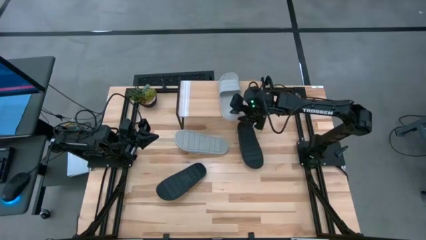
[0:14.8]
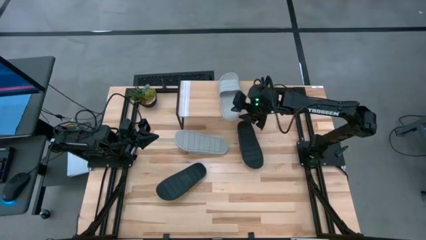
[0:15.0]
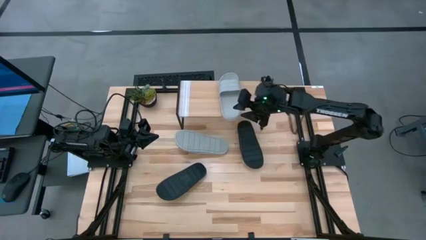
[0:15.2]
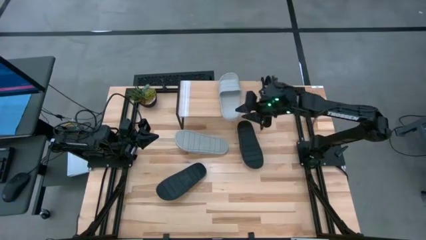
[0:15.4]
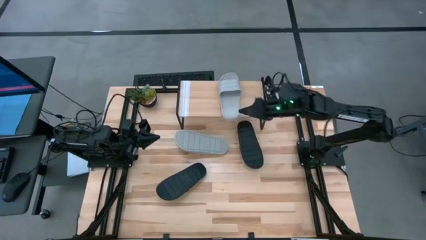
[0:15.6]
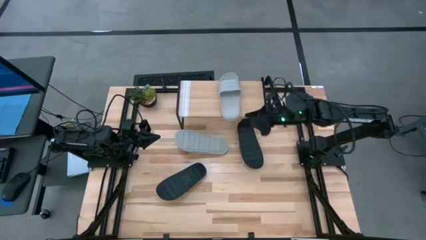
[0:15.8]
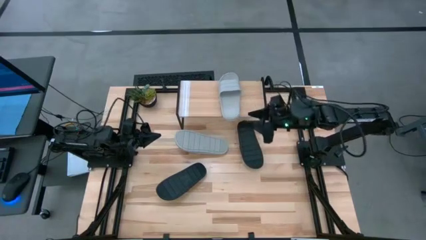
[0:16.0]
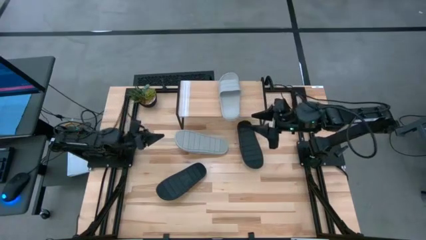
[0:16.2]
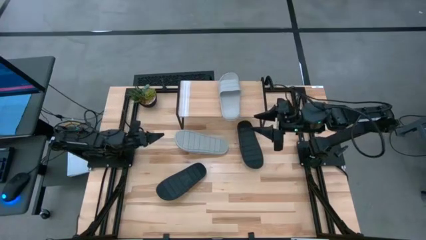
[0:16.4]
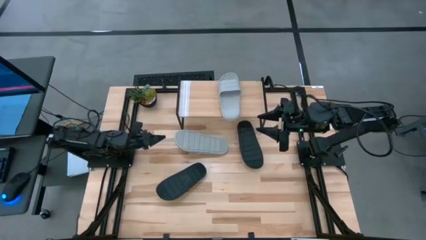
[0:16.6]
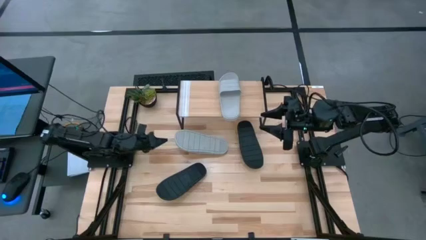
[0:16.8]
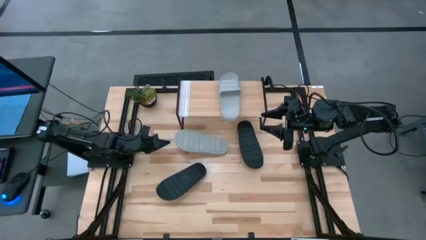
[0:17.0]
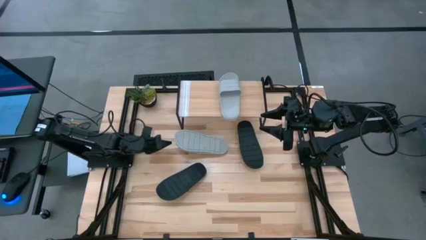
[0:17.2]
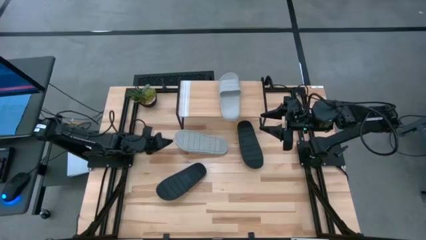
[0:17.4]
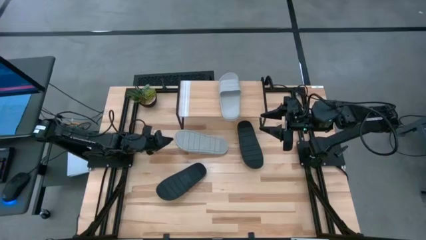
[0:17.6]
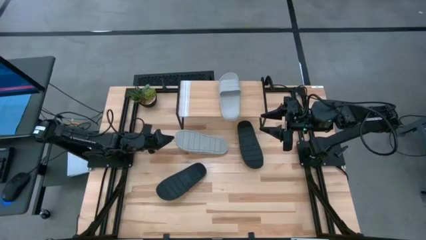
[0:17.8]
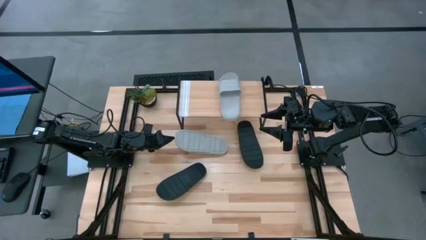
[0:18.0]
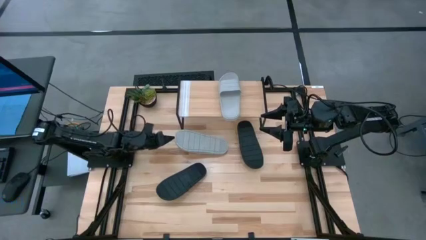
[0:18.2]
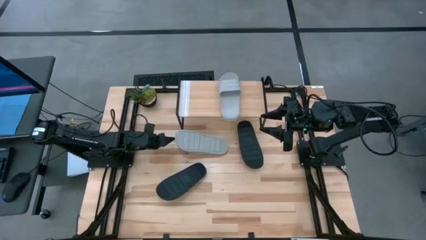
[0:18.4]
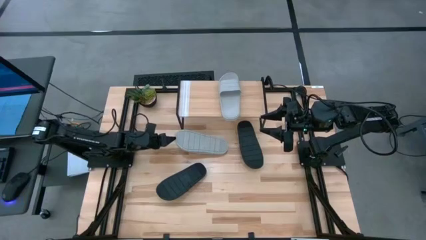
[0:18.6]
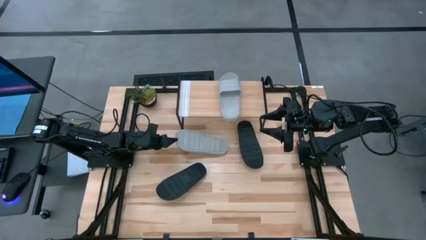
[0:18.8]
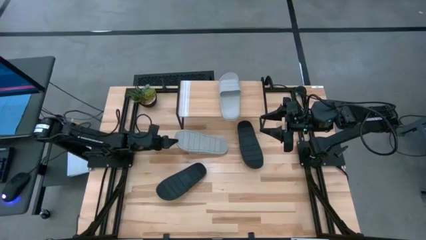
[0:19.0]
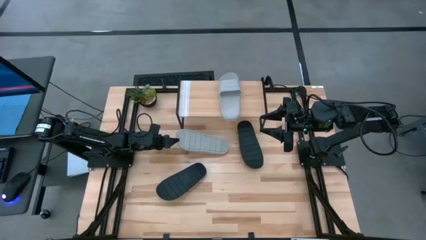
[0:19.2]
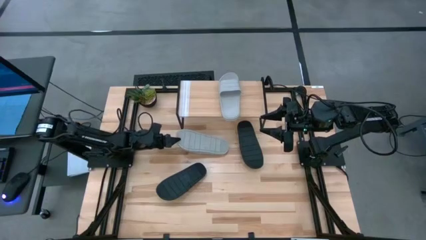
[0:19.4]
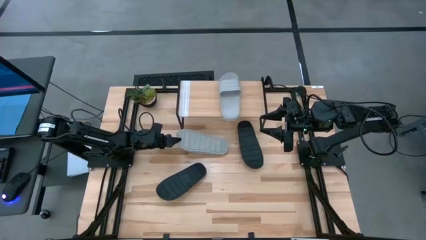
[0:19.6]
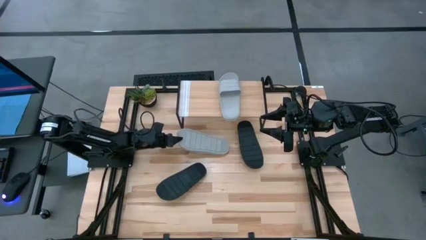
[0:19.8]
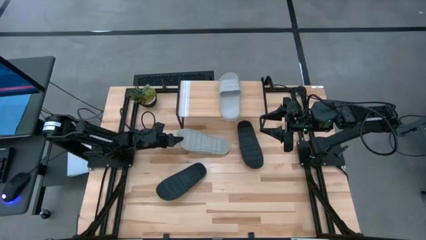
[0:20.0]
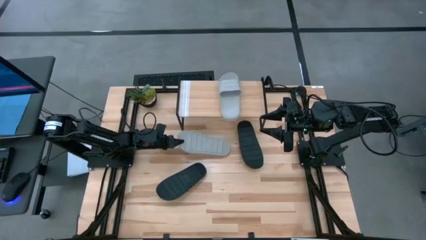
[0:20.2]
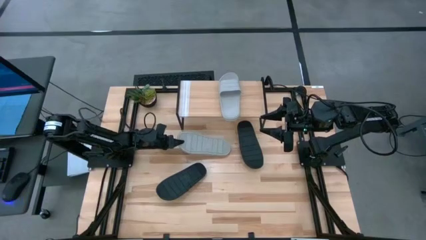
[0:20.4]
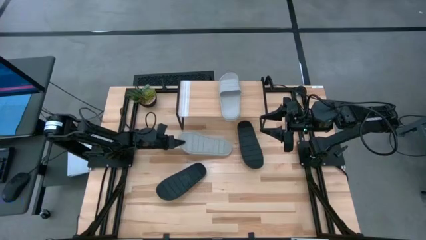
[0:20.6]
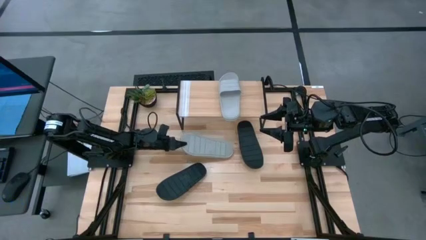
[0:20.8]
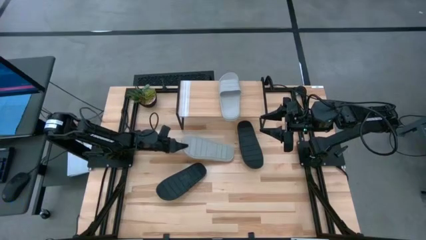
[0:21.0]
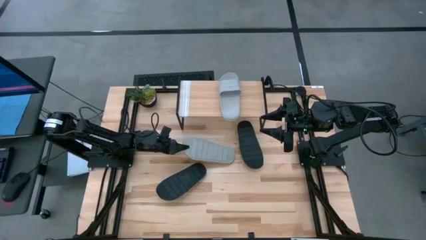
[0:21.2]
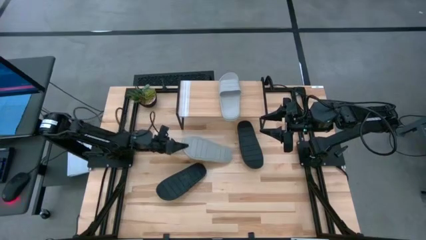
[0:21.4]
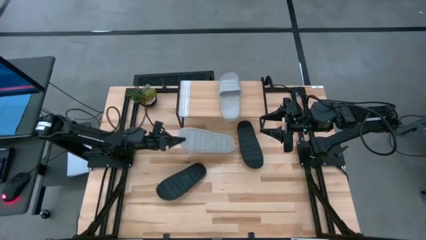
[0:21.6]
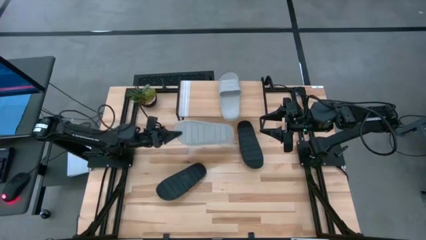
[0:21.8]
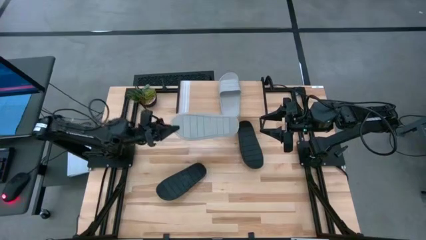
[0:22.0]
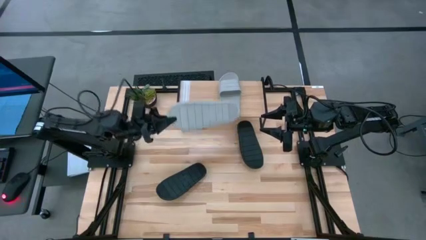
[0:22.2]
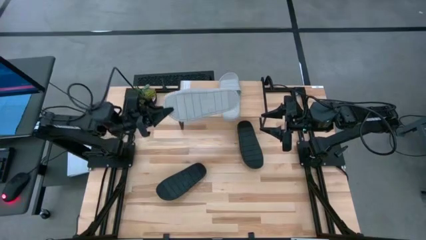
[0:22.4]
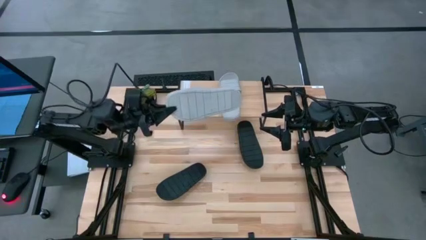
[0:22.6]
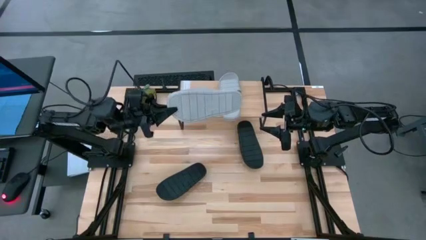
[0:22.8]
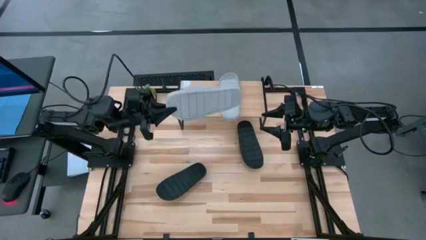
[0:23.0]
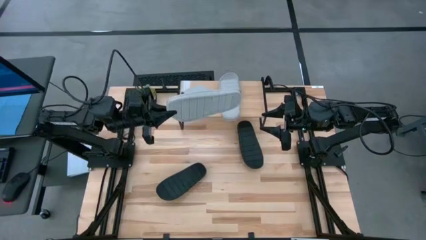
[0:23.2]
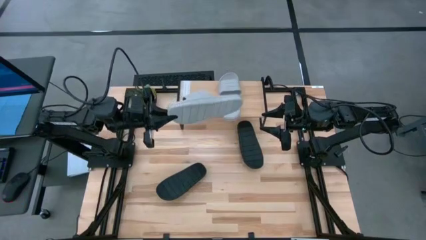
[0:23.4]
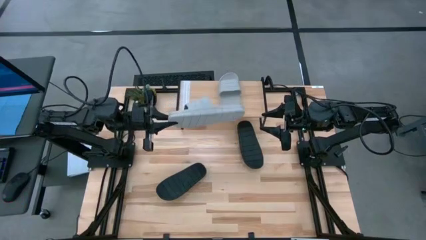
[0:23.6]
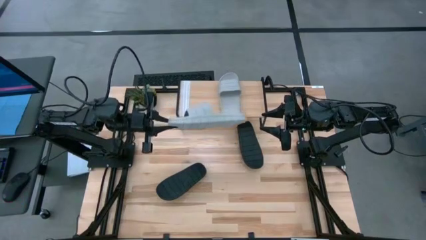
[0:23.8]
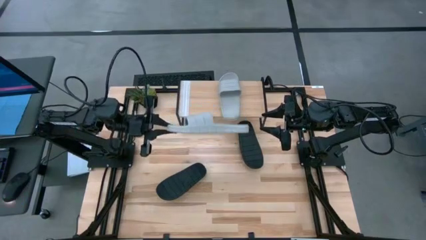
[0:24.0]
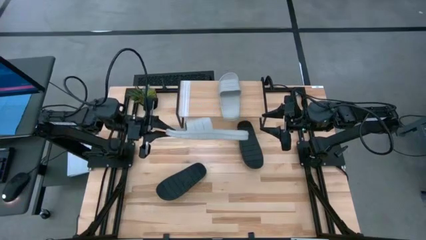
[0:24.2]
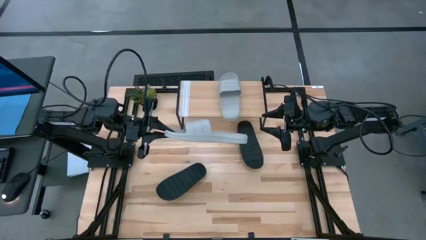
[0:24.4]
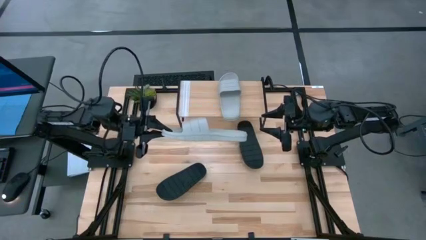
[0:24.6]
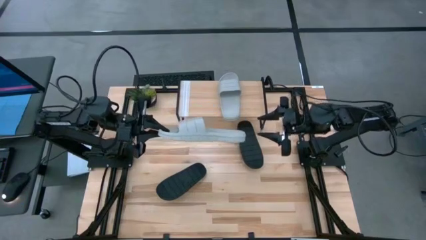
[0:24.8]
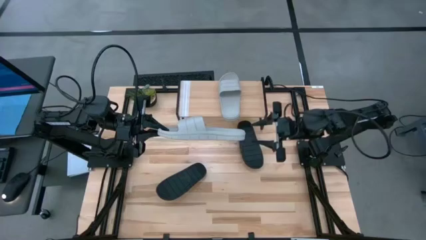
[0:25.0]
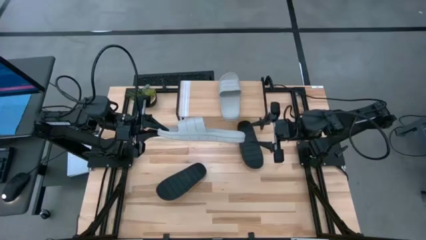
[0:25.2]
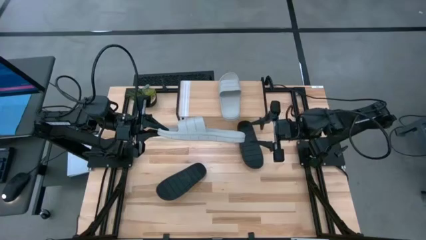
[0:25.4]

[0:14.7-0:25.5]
Task: Pick and place slides into the shelf
Put the gray slide on the shelf

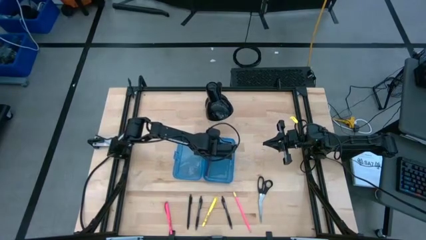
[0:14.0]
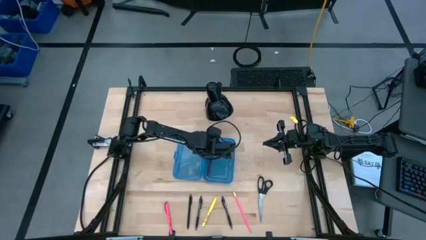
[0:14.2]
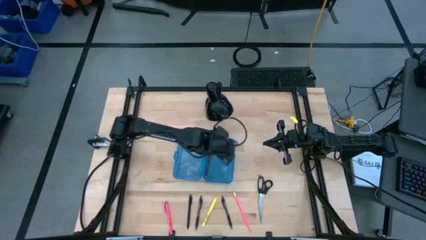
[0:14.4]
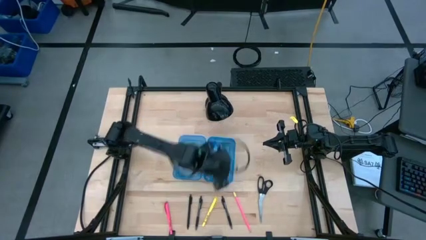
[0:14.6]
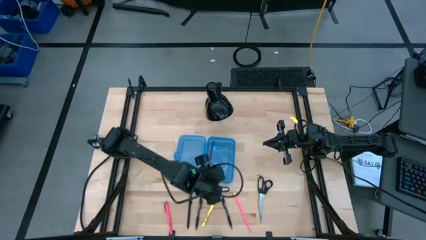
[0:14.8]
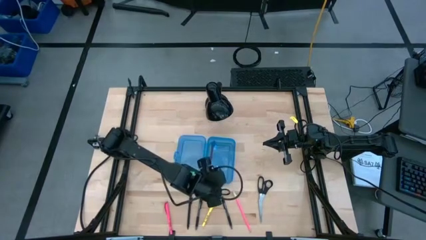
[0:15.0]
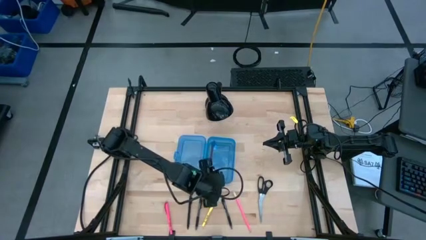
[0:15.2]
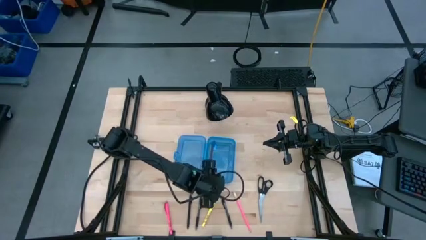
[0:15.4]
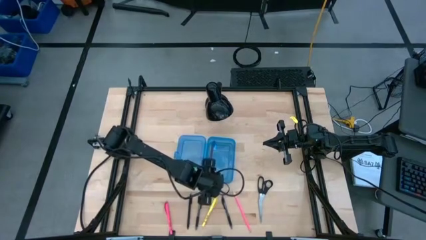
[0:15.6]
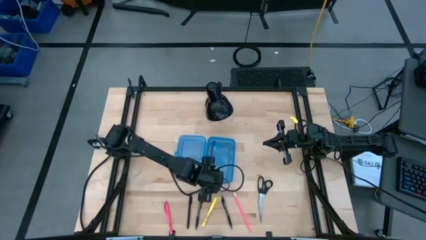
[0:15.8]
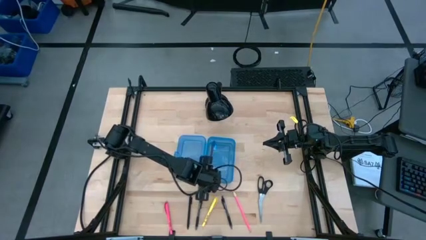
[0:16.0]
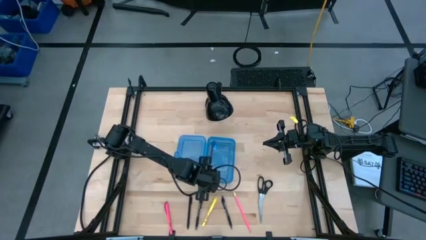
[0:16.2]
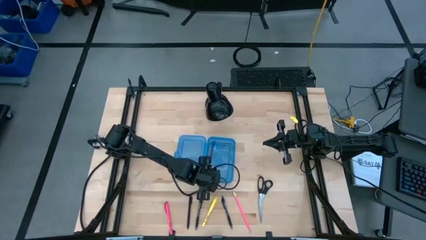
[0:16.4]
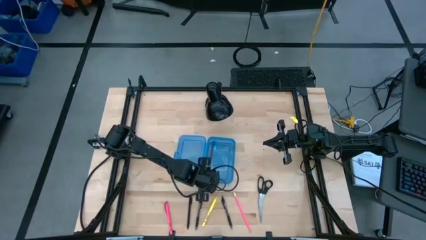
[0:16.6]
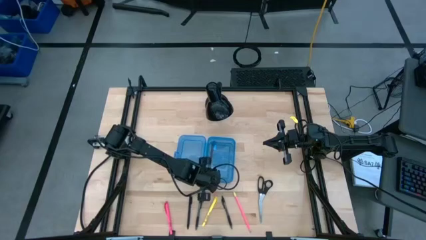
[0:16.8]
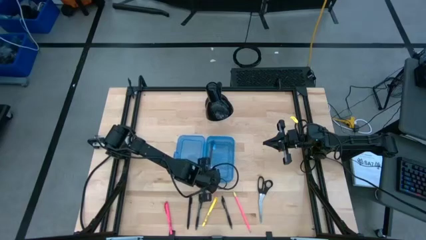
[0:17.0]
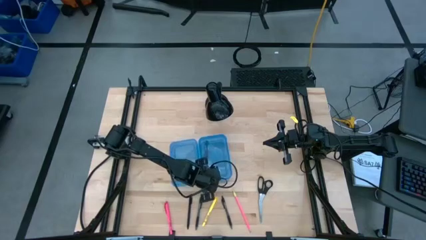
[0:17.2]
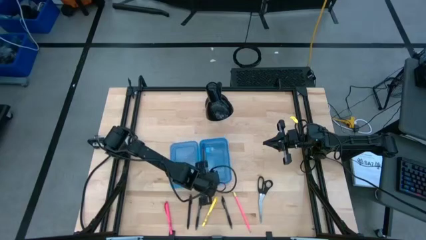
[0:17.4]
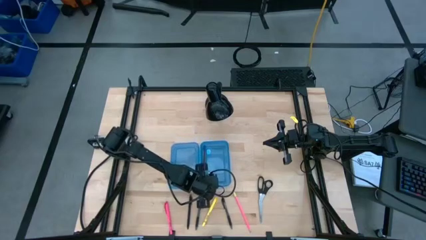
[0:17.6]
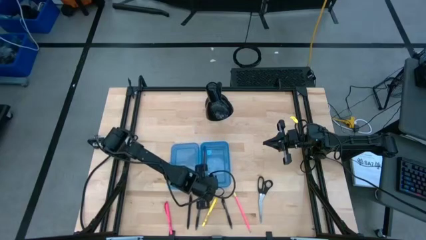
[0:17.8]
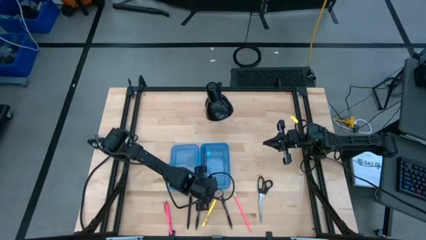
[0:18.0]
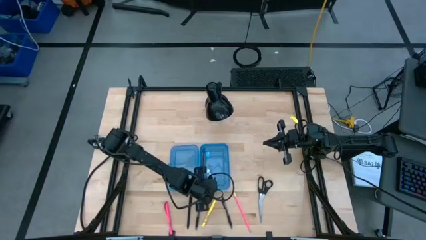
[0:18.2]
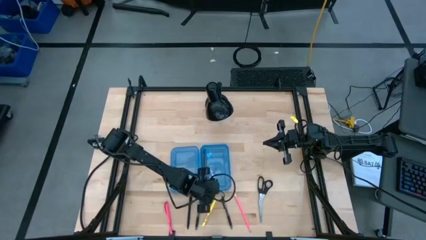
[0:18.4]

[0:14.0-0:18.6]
Task: Pick & place school supplies into a supply box
Adjust the blue supply box on the table
